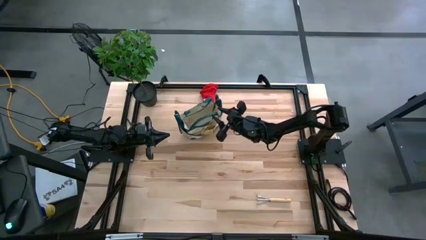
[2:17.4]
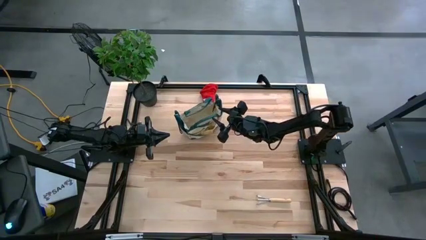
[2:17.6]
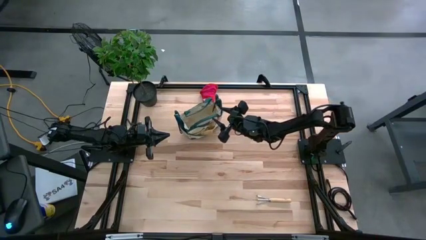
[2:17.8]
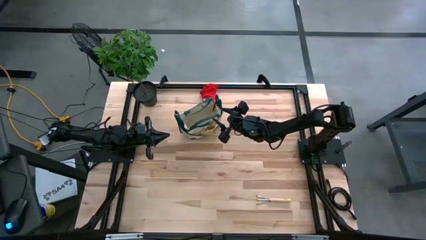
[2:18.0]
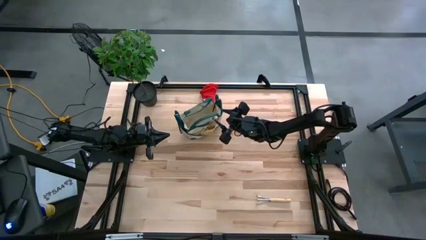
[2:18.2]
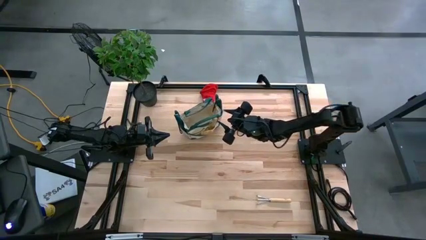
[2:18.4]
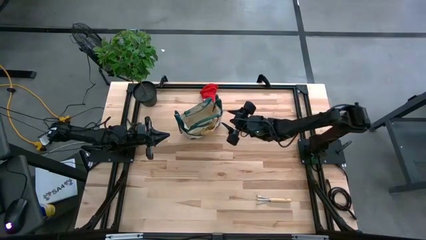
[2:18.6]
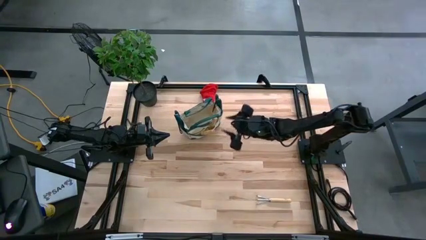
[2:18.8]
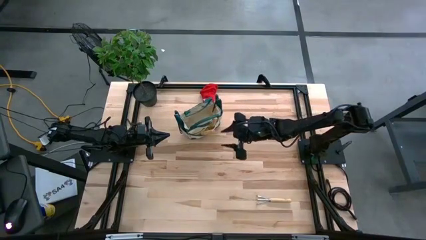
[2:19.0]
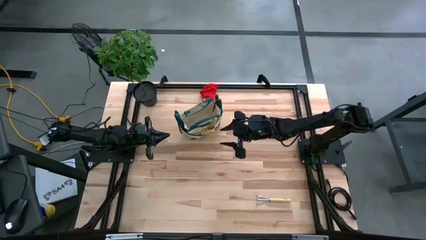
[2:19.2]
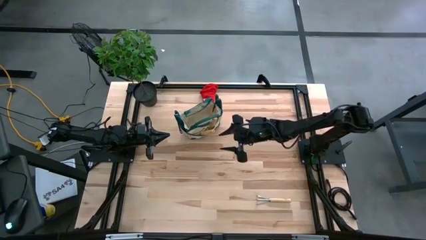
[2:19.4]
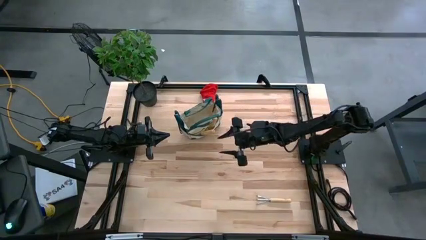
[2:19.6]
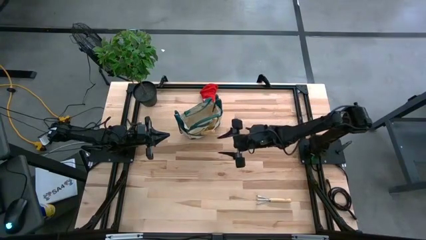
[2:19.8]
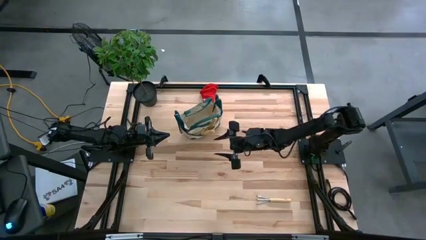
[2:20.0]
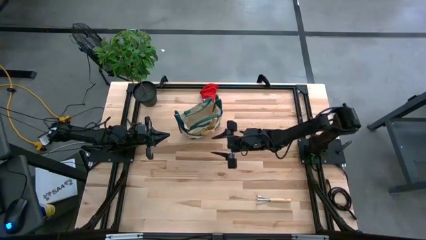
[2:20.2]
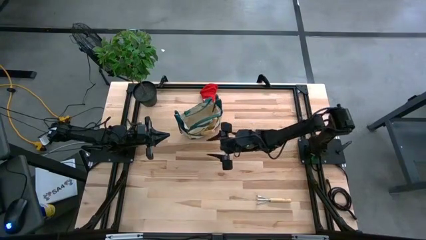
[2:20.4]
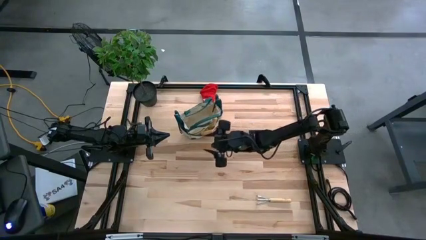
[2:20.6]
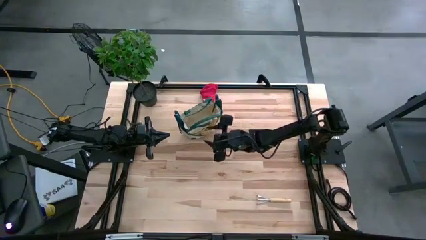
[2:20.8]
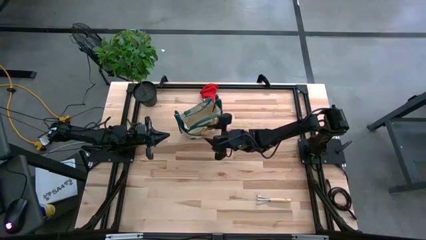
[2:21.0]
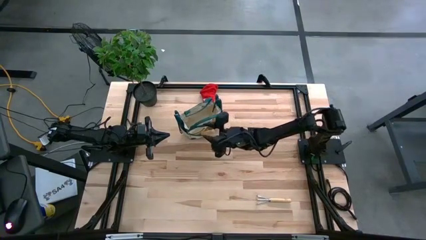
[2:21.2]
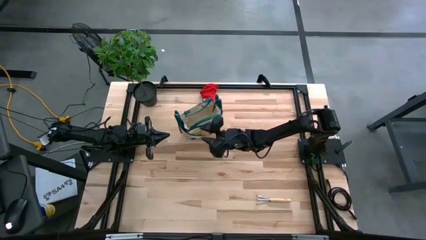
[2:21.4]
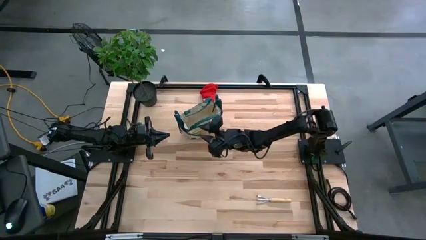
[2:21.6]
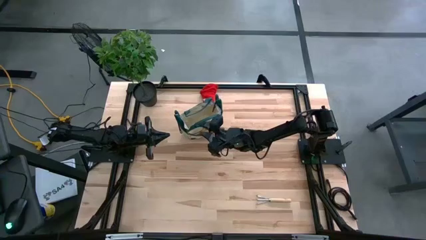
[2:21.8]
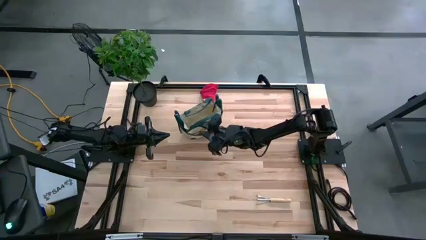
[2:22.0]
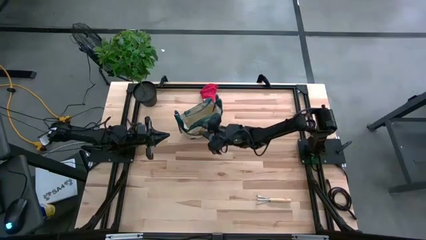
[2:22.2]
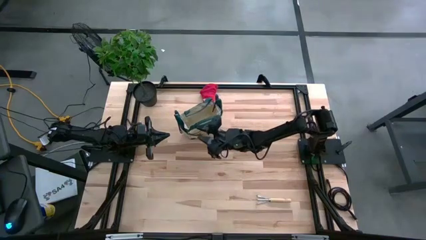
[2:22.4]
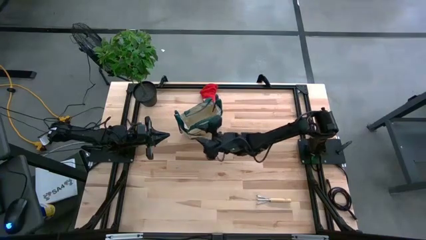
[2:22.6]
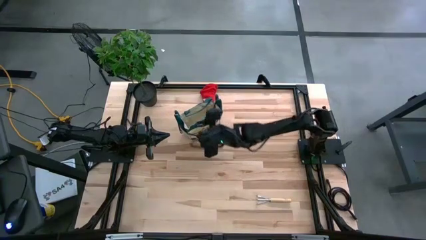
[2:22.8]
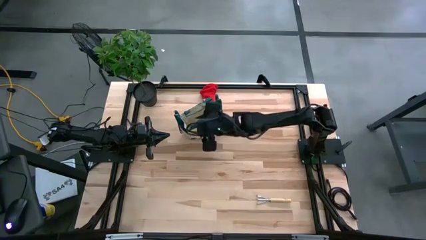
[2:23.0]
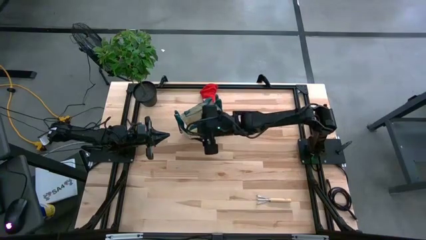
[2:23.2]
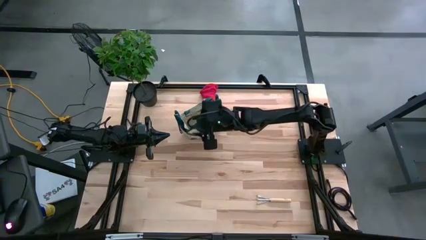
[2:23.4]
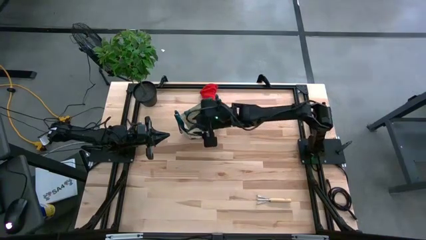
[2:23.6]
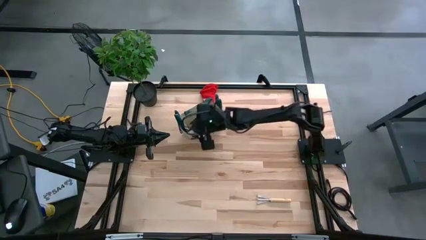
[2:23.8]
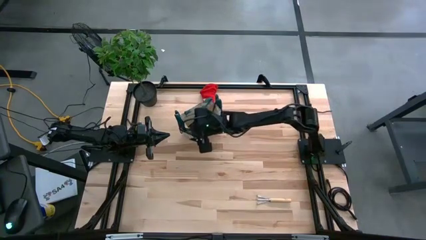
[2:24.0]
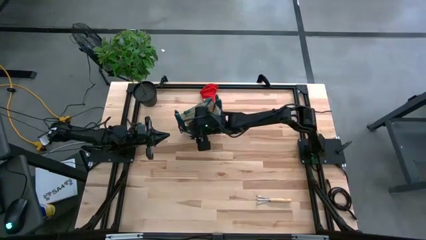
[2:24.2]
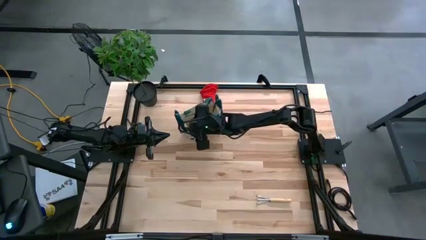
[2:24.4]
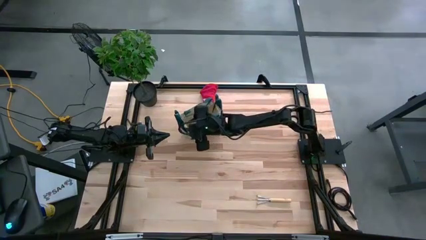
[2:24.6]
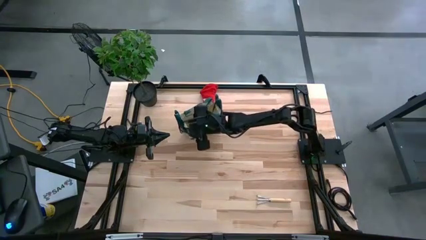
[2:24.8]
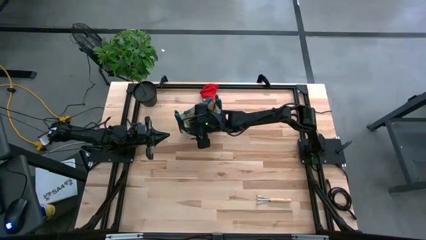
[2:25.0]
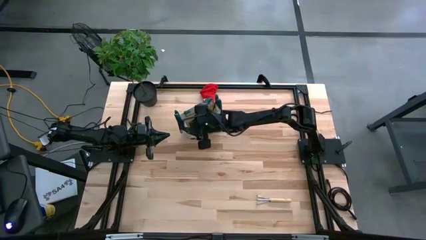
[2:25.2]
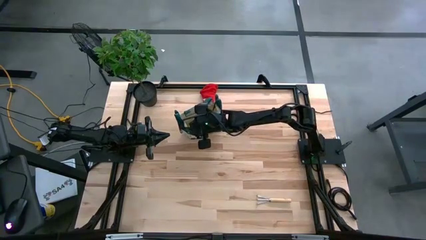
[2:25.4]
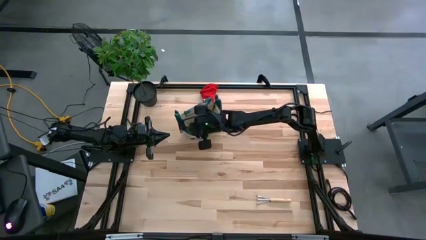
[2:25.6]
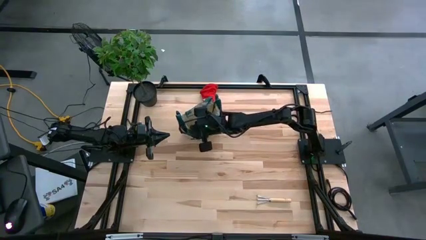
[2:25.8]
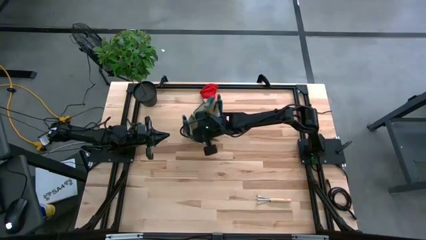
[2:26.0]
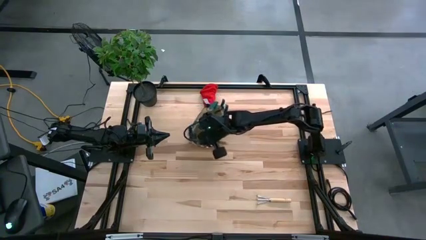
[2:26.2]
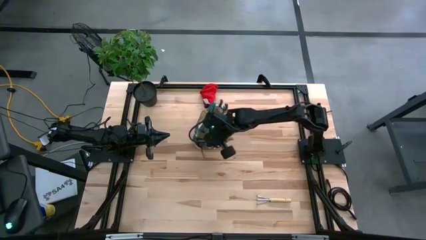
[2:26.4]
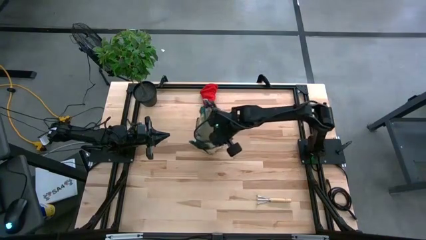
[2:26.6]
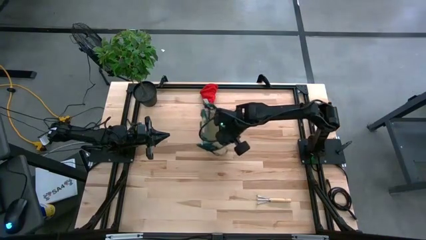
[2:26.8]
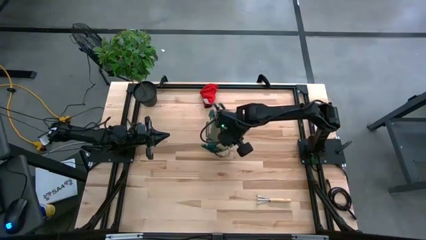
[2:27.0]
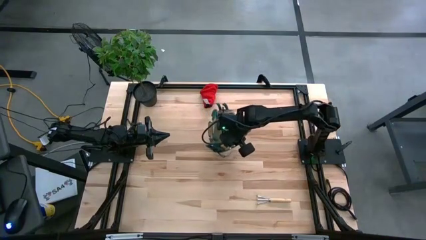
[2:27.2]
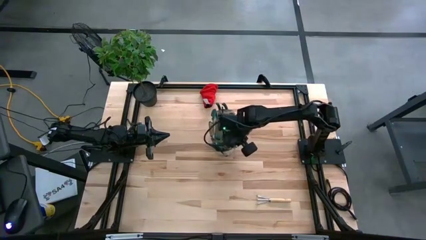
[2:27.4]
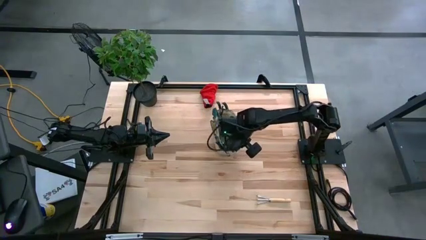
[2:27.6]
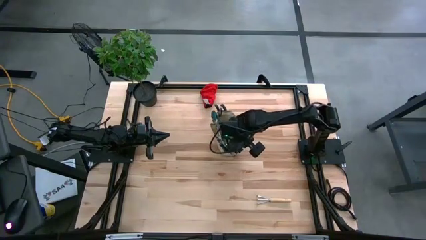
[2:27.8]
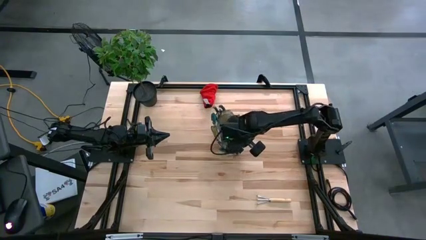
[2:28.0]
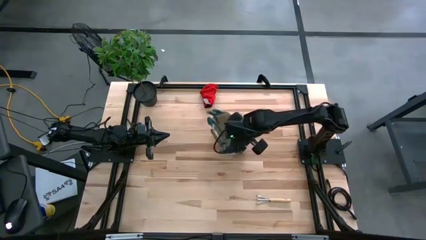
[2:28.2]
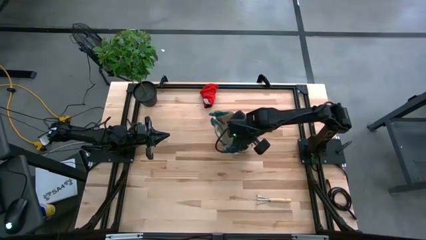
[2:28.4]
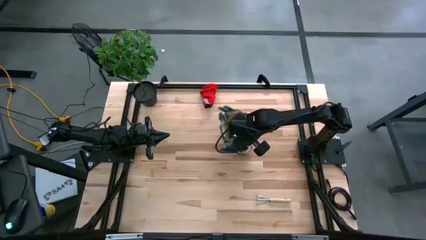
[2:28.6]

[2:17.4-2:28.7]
Task: Pick & Place Garden tools in Gardening bag
Adjust the gardening bag

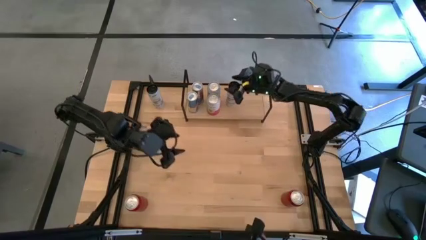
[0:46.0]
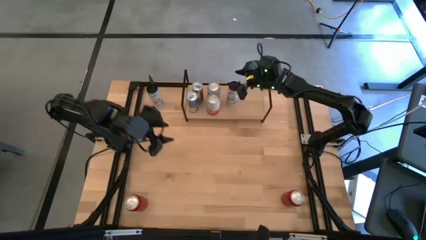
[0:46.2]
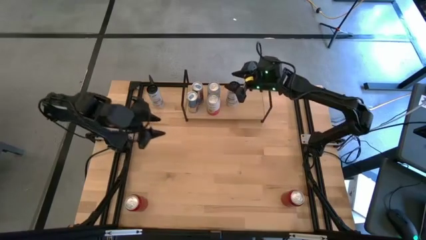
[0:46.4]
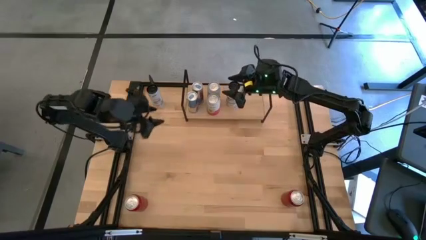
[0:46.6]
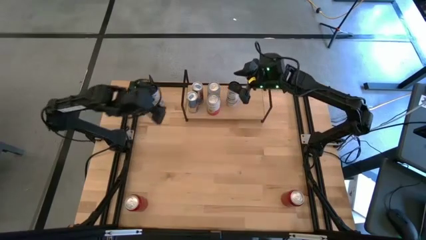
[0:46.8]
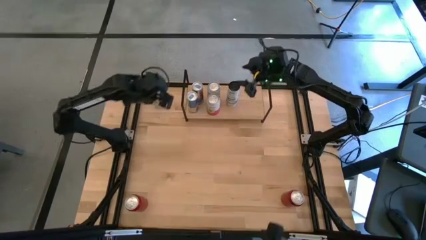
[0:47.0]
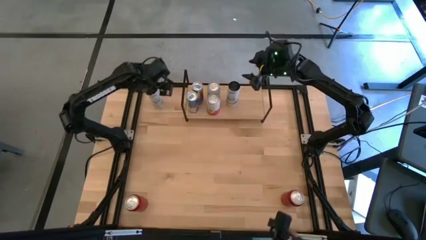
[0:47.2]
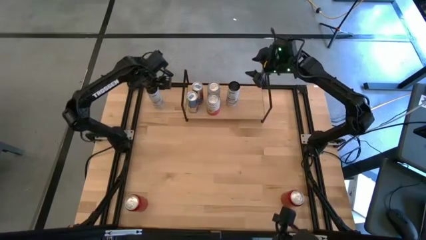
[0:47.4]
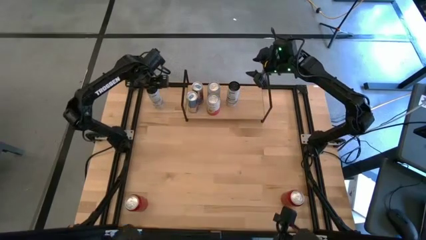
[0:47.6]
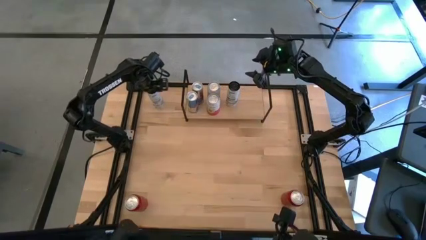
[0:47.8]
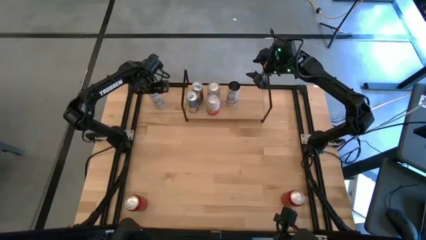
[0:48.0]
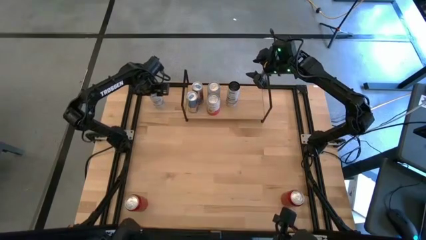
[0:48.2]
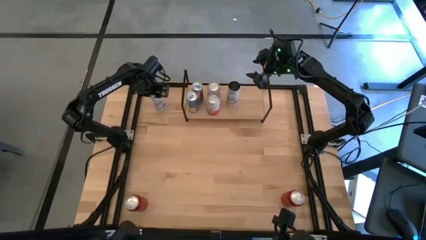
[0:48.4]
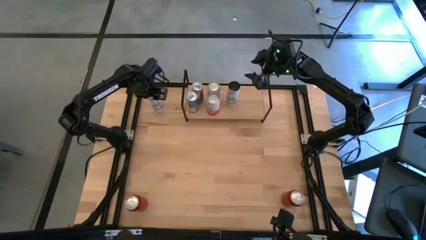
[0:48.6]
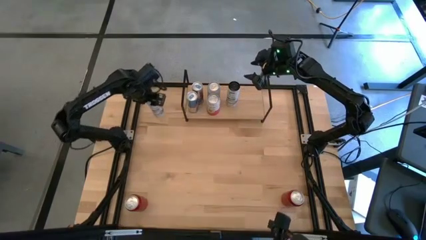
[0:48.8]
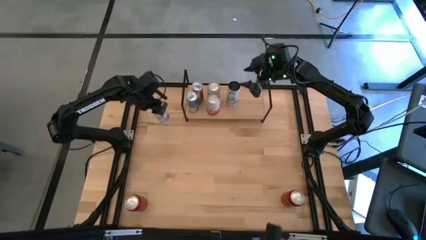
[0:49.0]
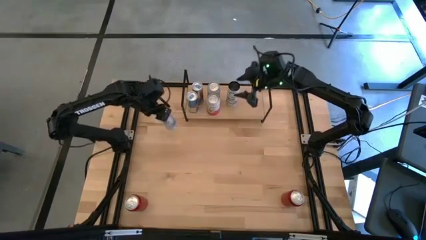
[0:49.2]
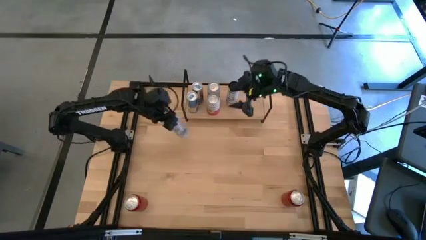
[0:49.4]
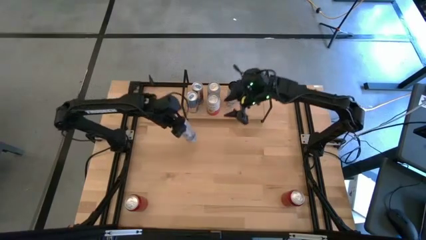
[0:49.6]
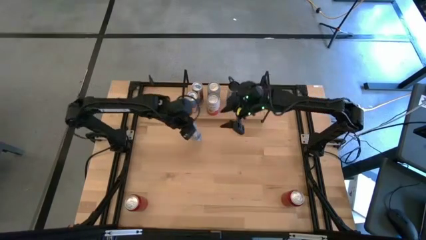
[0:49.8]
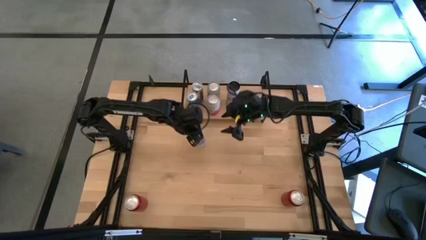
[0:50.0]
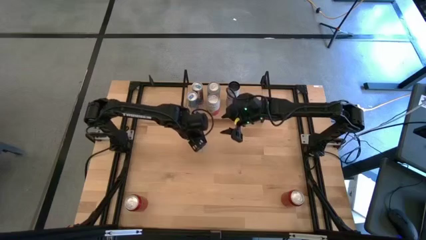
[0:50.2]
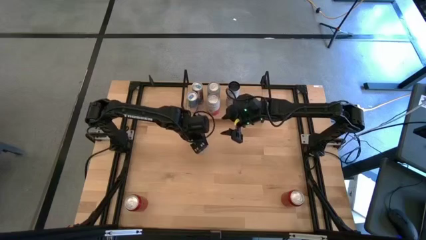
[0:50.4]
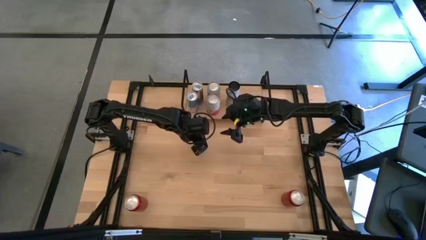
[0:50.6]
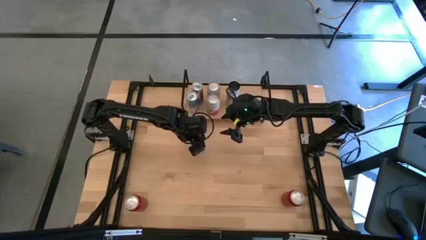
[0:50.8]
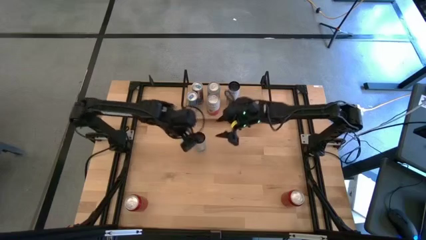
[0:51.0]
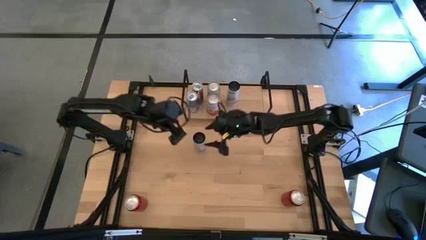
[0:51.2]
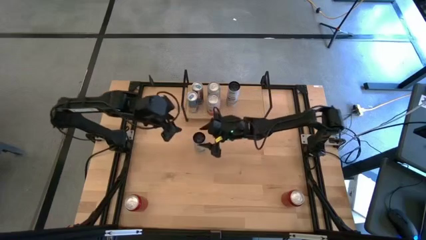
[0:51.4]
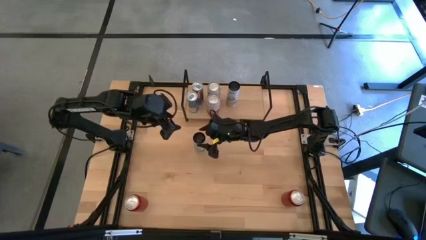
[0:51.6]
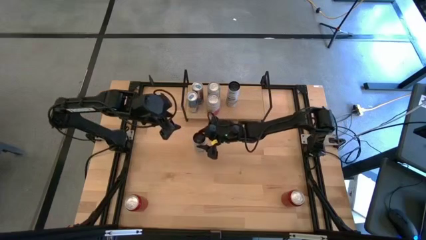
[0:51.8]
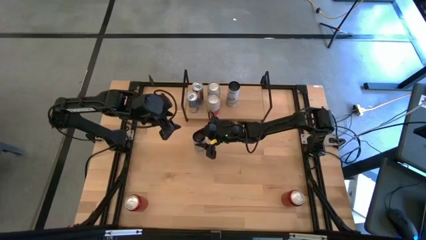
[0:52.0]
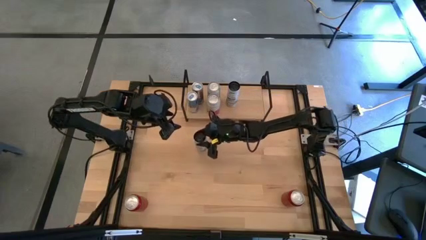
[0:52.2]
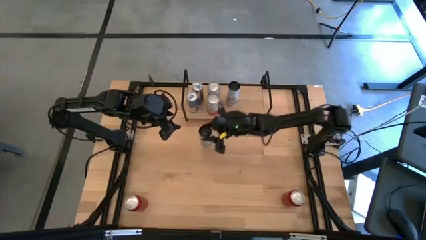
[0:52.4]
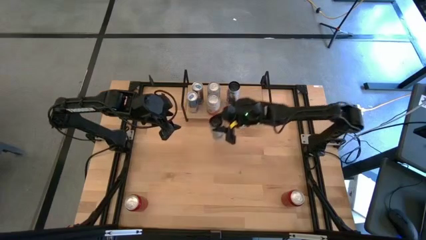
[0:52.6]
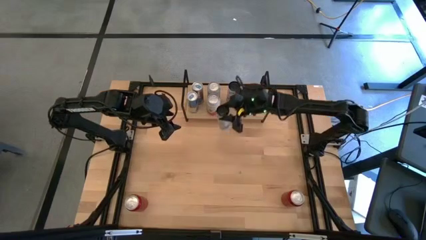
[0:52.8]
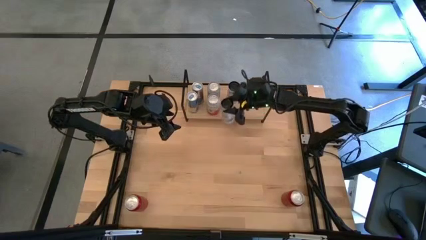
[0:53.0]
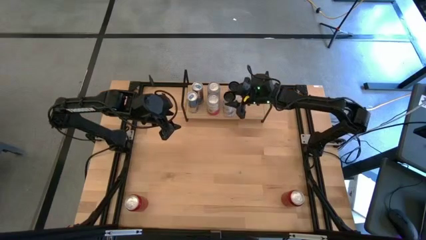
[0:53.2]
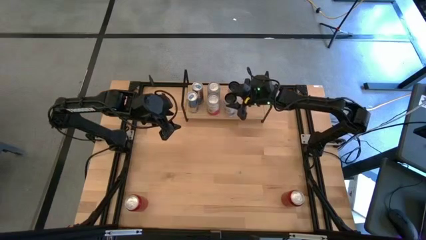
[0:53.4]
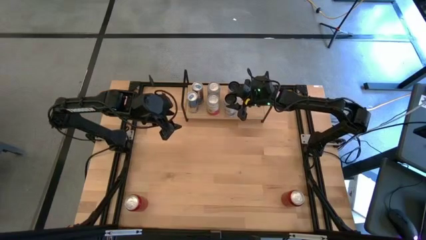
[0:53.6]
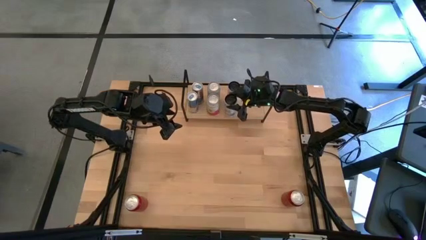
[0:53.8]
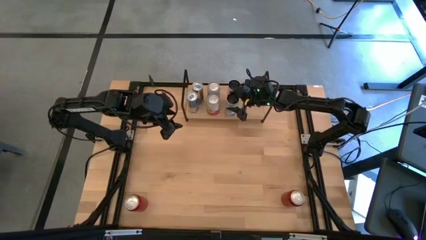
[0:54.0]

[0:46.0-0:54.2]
Task: Place canned beverage on shelf
Put the white soda can on the shelf aligned with the other white soda can
